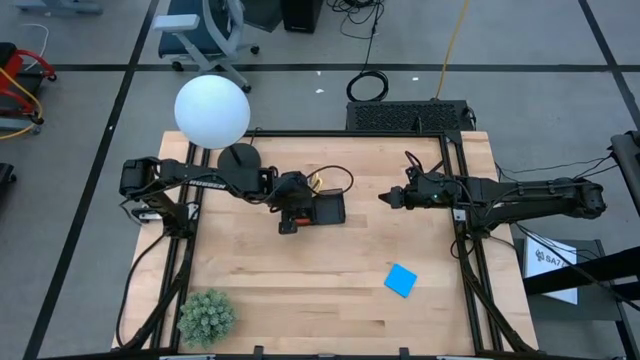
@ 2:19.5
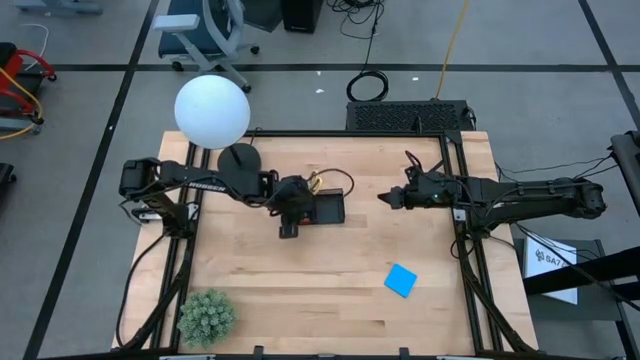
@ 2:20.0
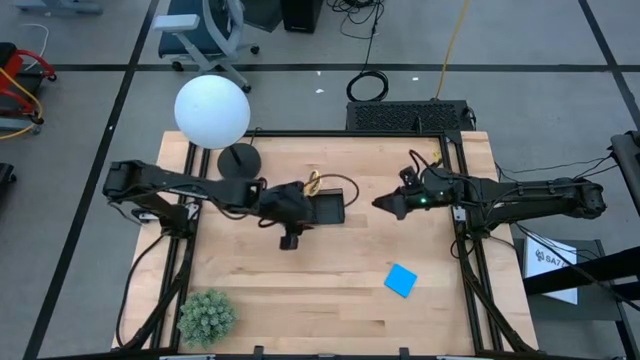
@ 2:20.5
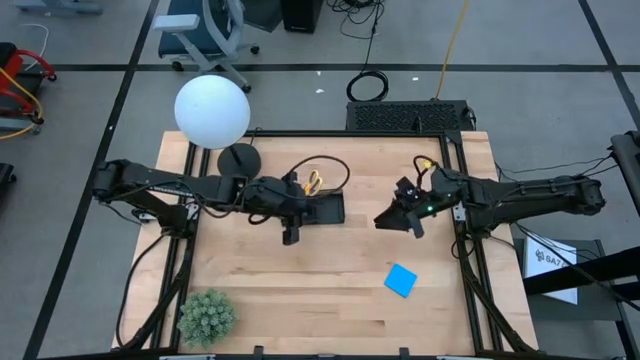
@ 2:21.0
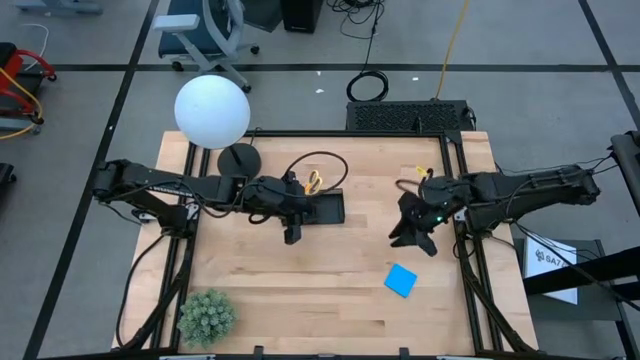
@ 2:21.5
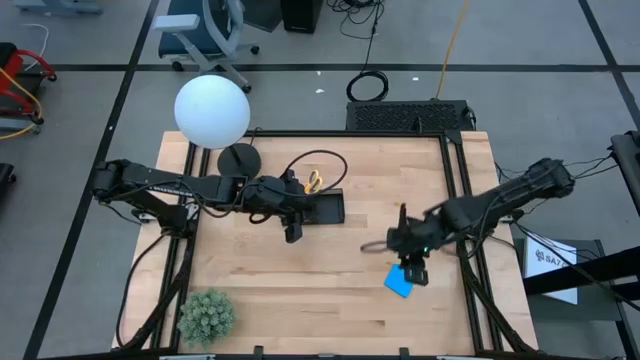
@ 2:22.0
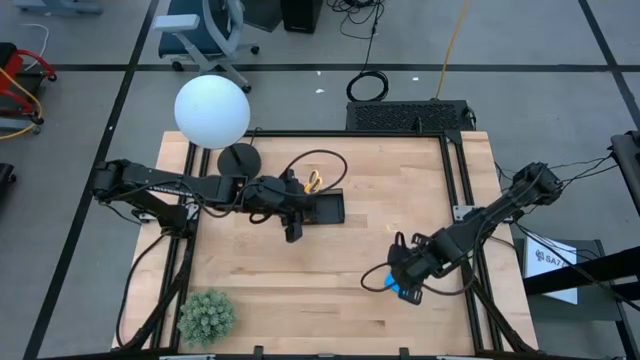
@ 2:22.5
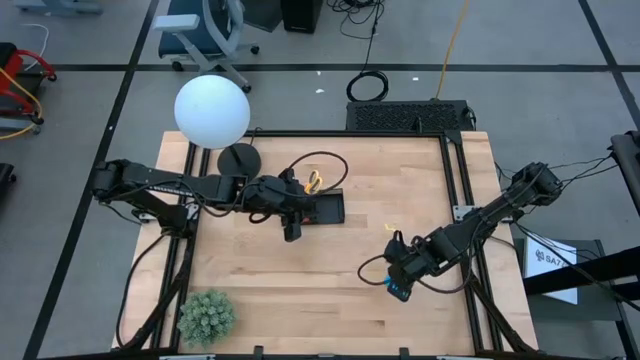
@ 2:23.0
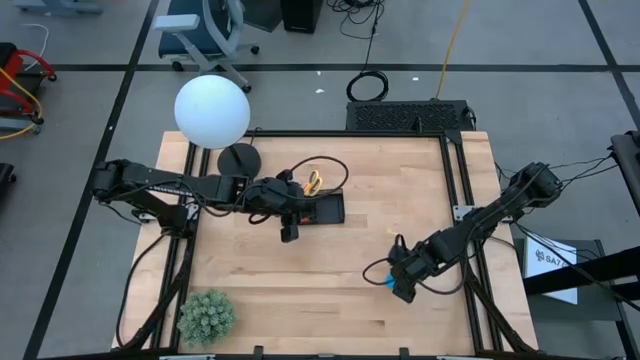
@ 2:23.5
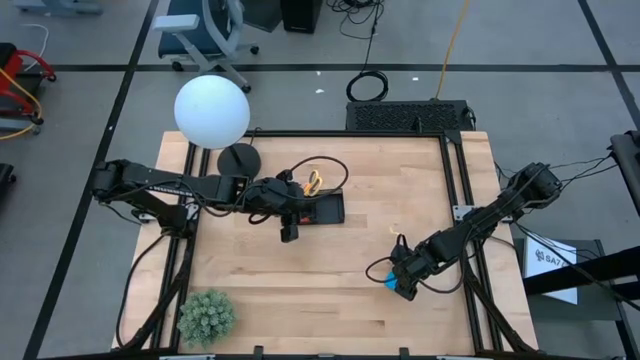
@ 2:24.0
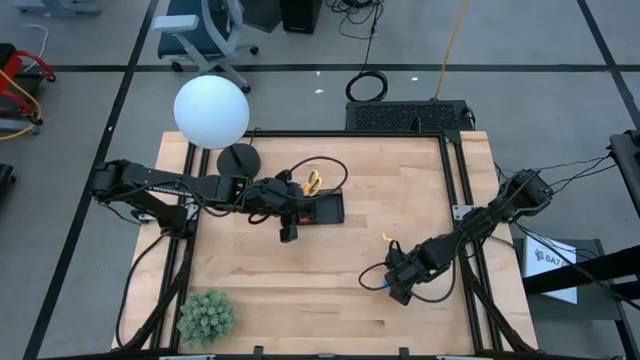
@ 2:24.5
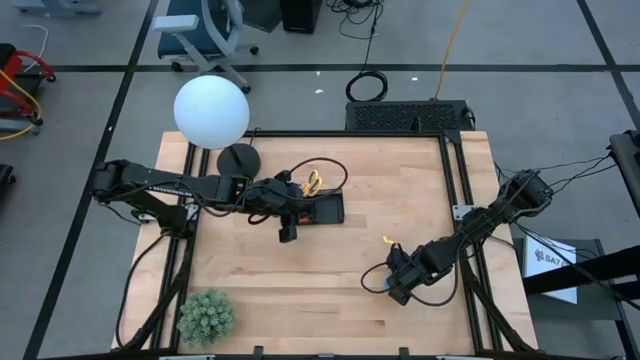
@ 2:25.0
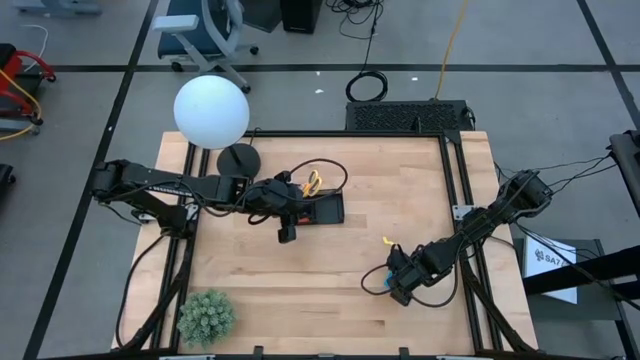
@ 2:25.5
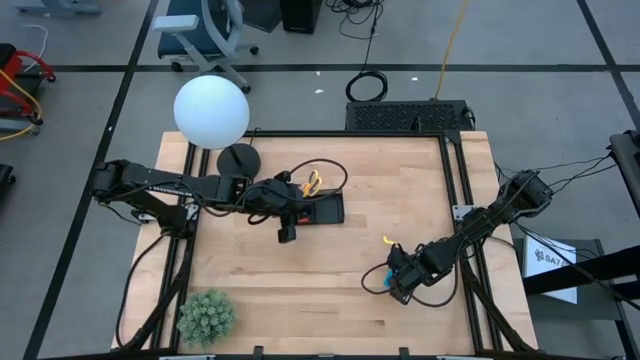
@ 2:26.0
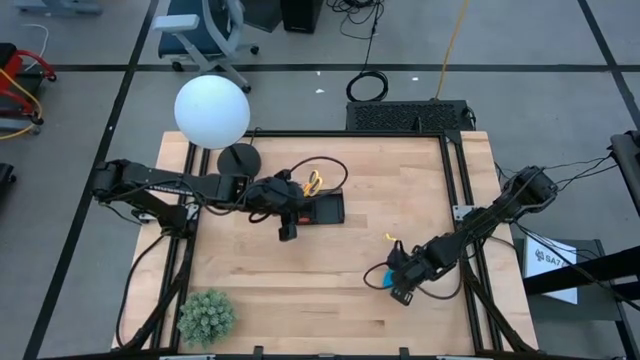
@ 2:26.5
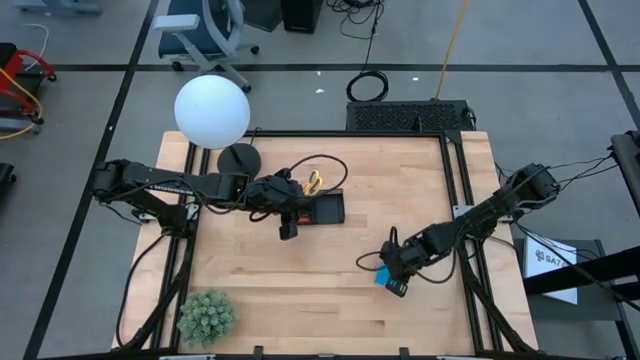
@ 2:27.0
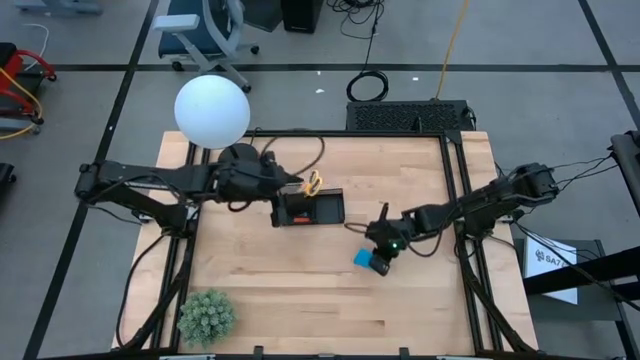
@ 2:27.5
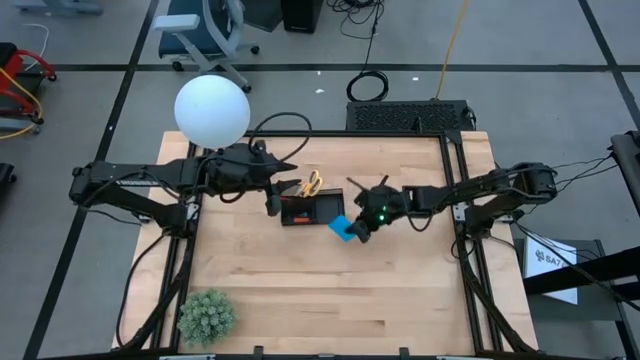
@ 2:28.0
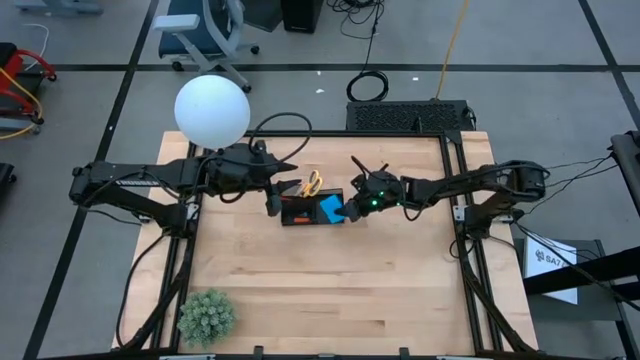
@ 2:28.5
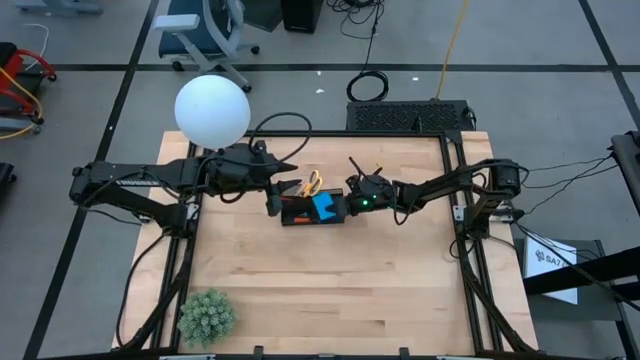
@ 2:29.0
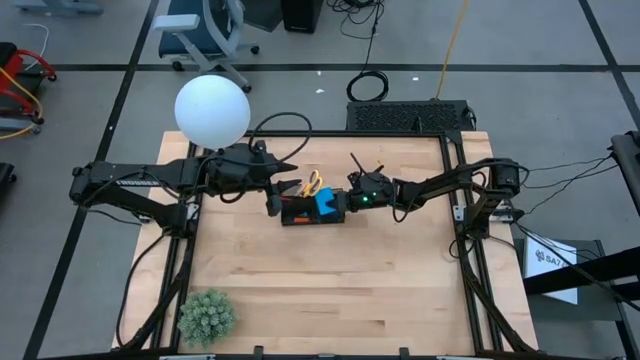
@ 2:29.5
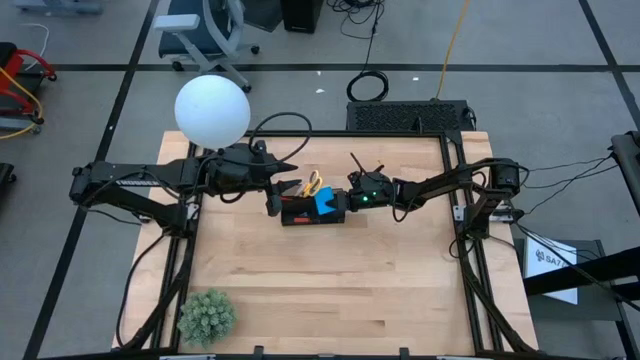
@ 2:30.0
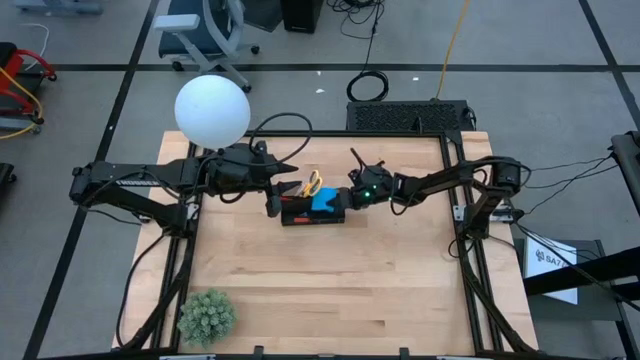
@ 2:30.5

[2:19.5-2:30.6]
Task: Pick and place office supplies into organizer
Put the blue sticky notes into the black organizer

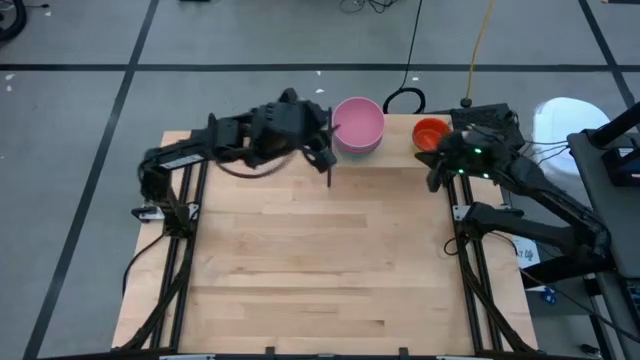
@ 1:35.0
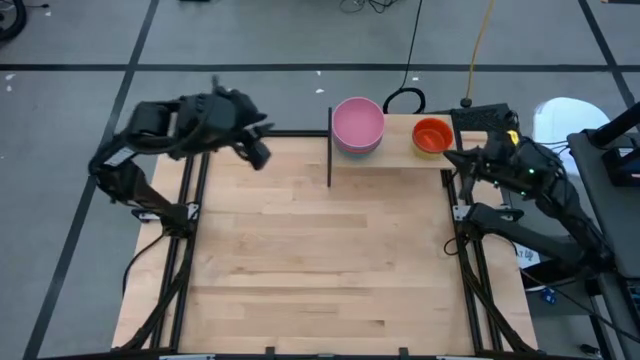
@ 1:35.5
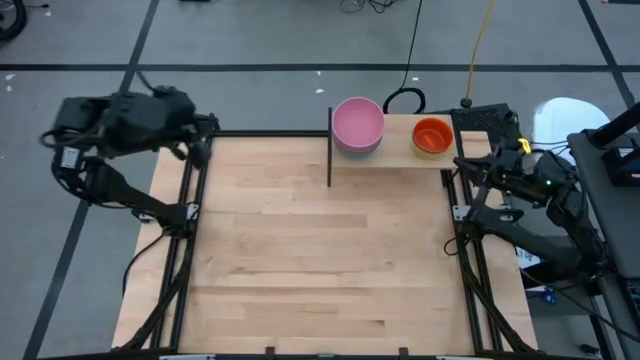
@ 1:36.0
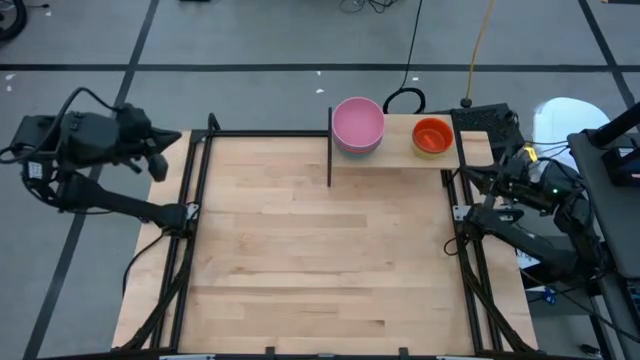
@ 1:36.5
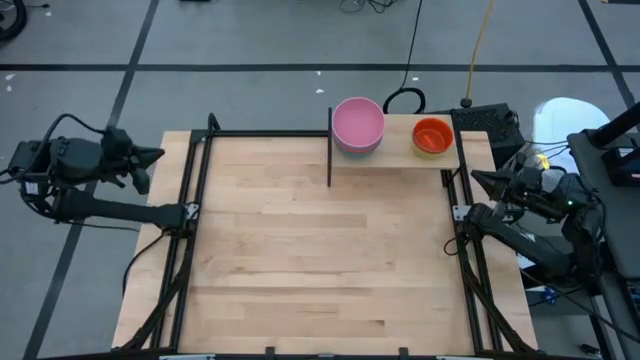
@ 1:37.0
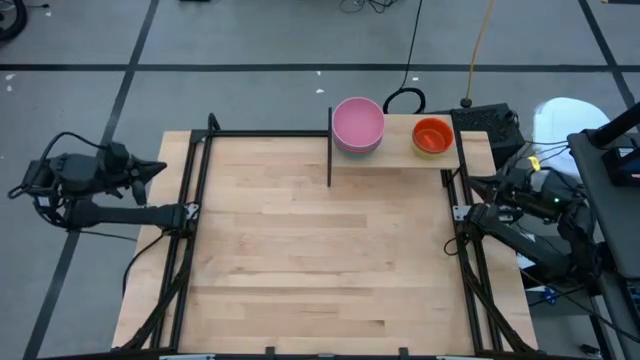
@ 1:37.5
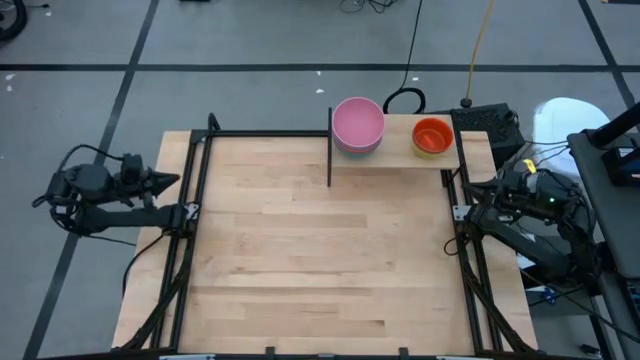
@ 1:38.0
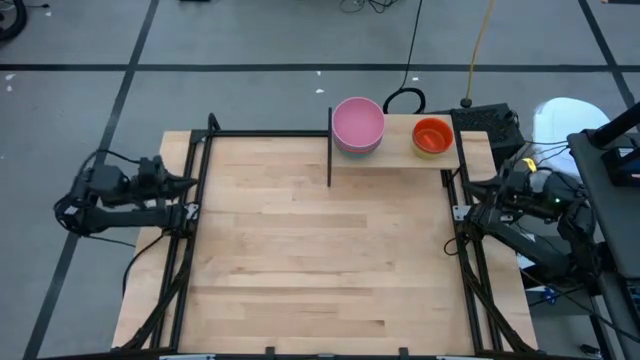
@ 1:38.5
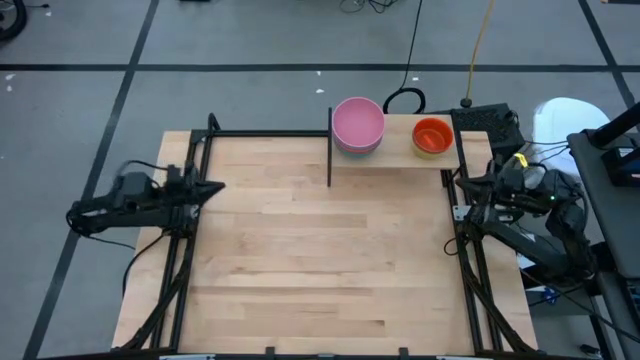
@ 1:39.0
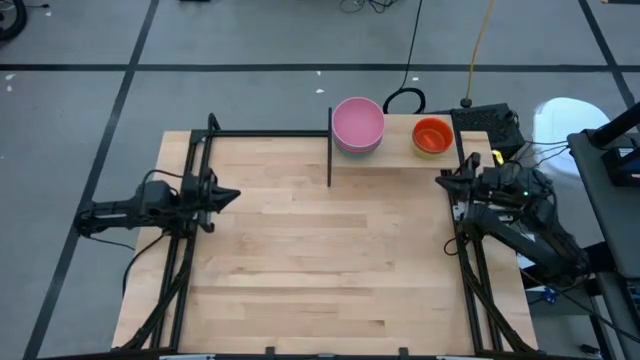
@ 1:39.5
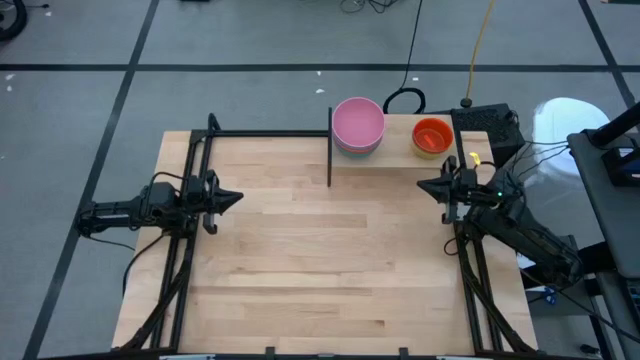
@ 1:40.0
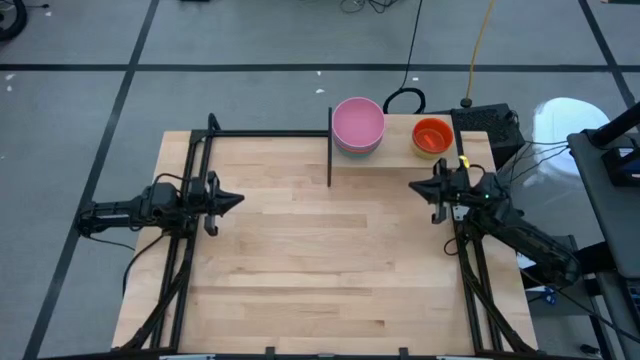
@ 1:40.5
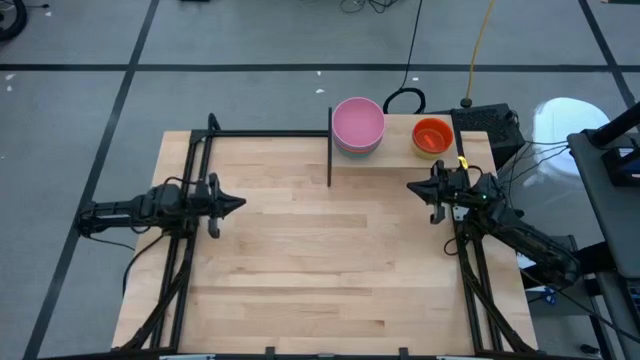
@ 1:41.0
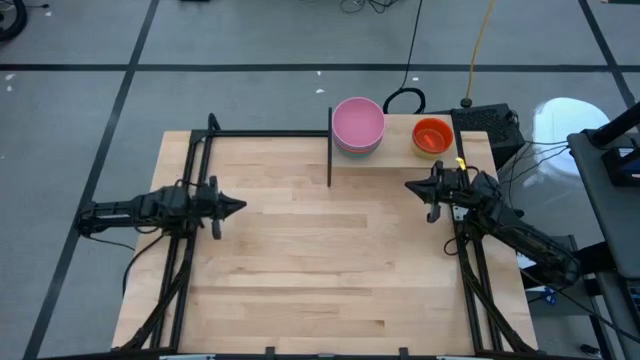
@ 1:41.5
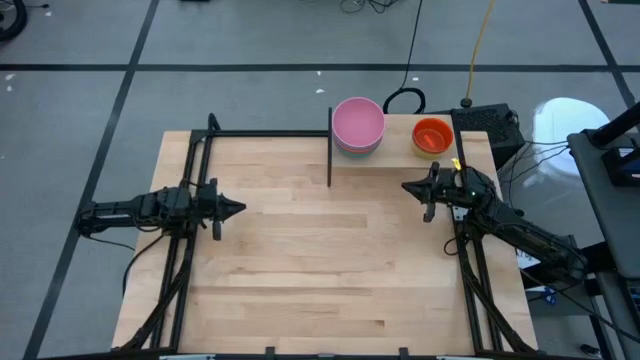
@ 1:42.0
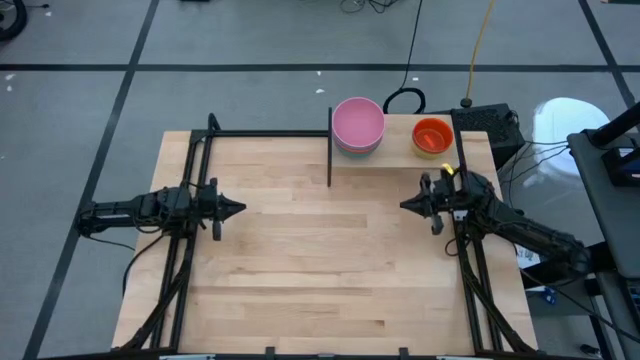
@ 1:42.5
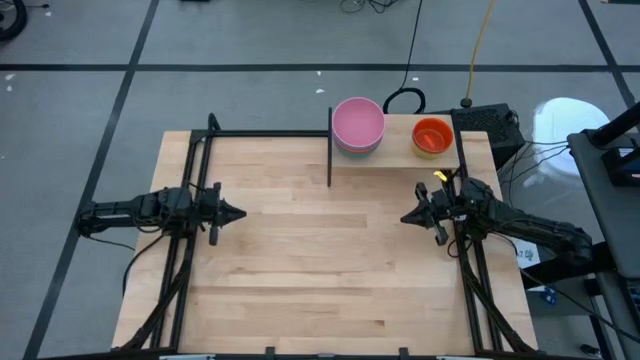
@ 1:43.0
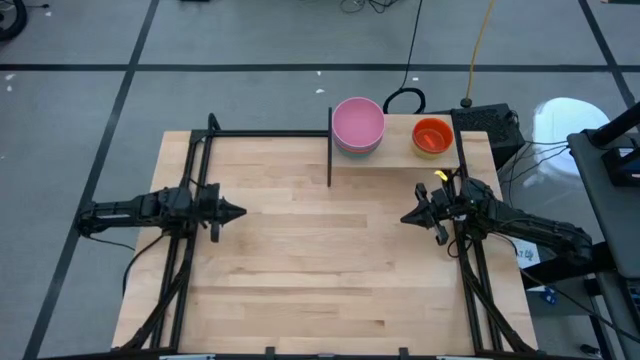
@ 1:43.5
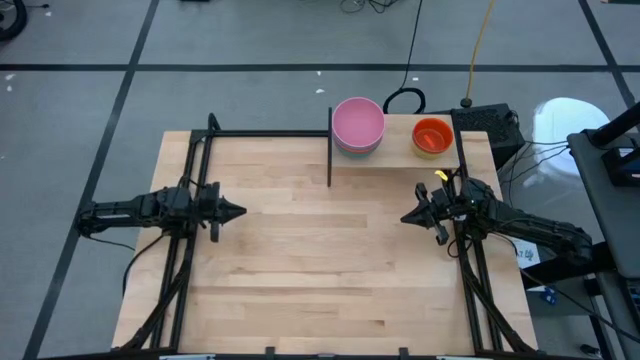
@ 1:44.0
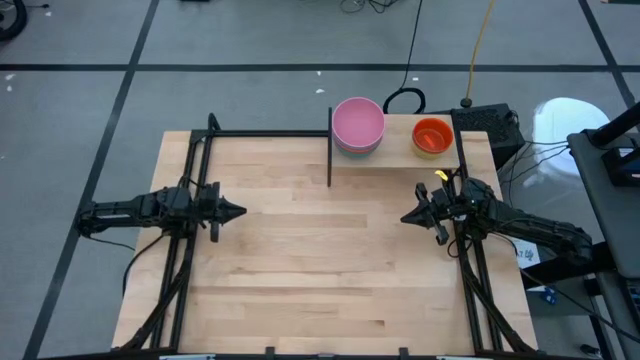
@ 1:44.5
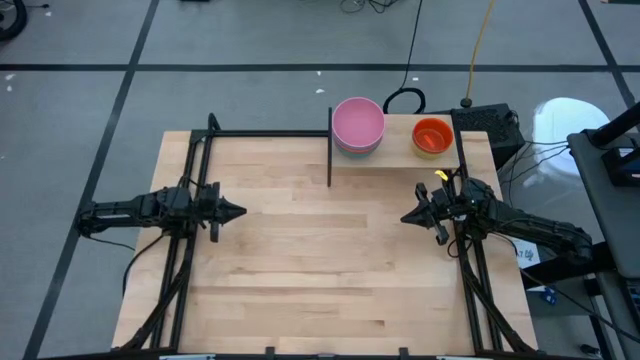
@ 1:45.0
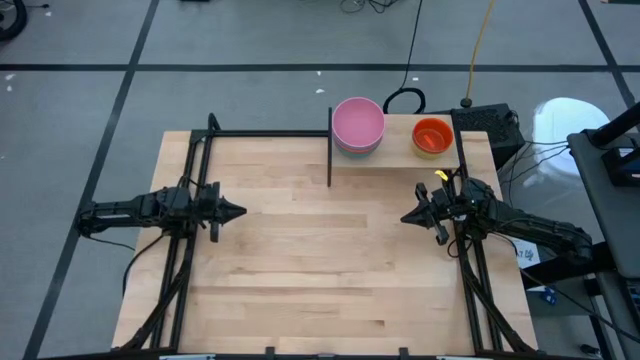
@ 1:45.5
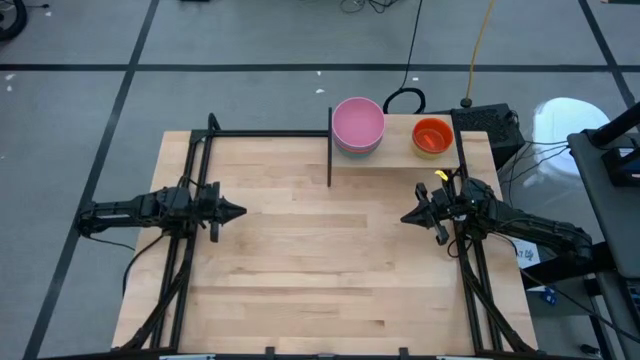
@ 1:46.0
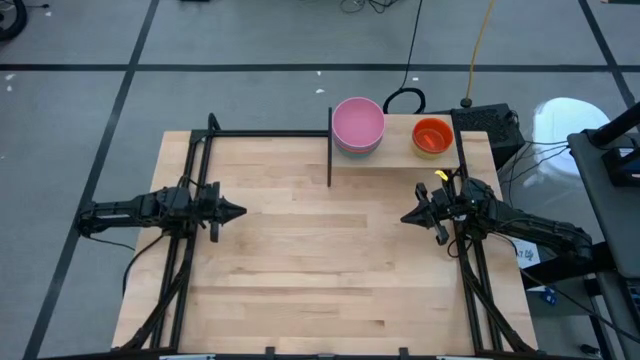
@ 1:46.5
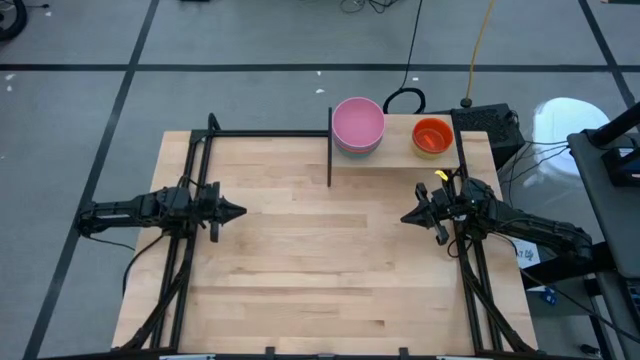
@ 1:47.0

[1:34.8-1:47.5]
Task: Place and stack bowls onto a shelf
Return to Home Position
